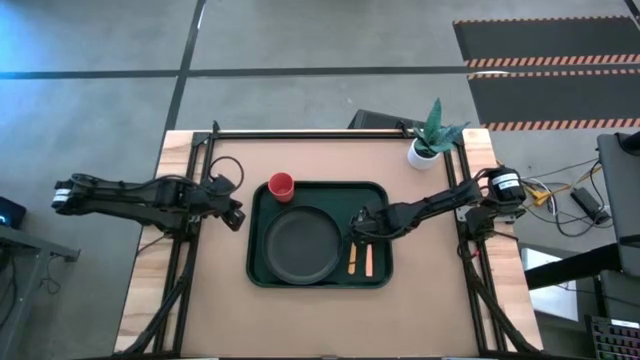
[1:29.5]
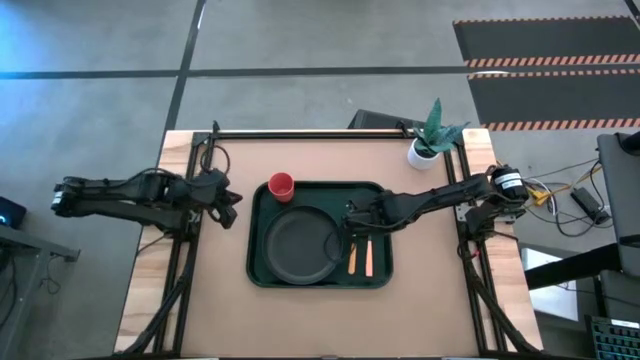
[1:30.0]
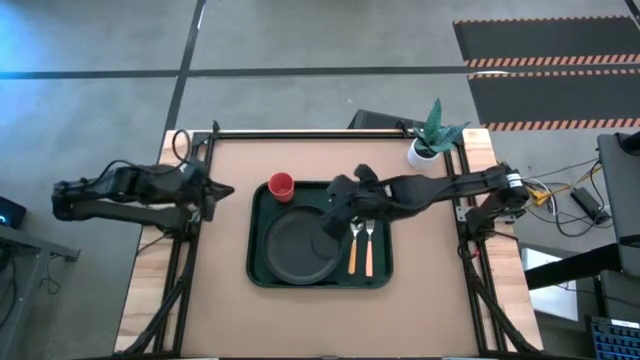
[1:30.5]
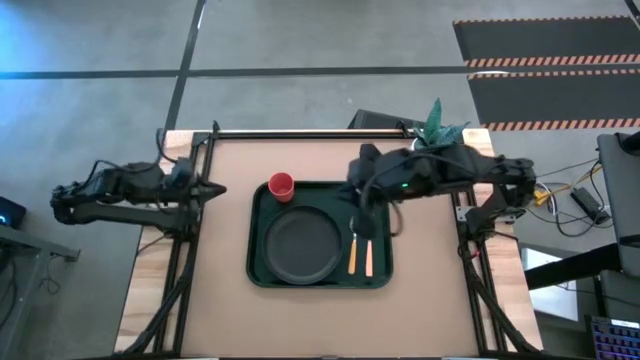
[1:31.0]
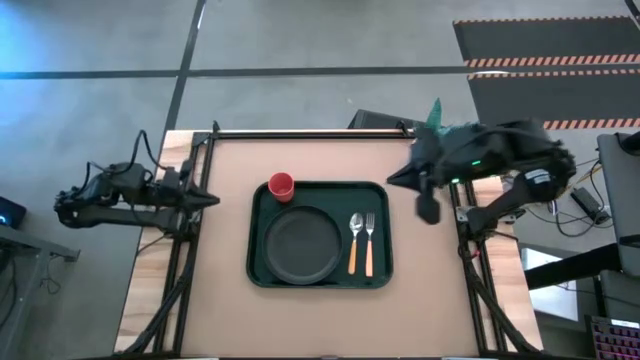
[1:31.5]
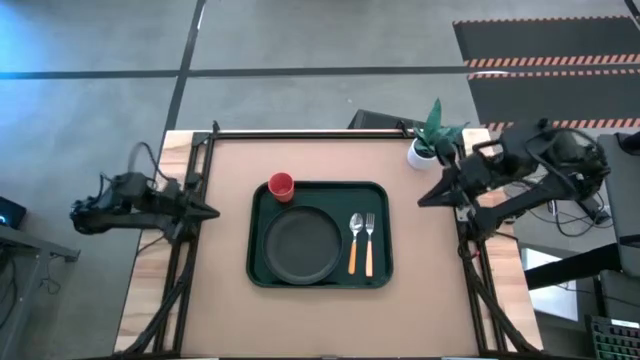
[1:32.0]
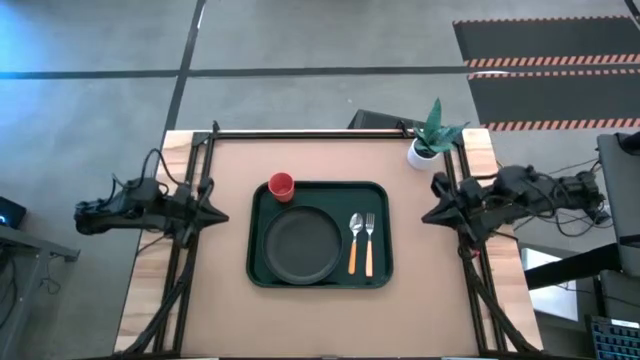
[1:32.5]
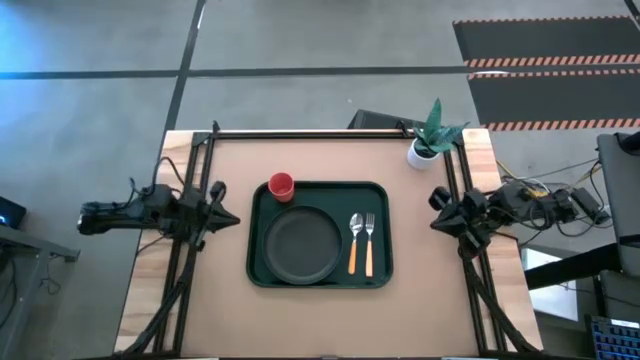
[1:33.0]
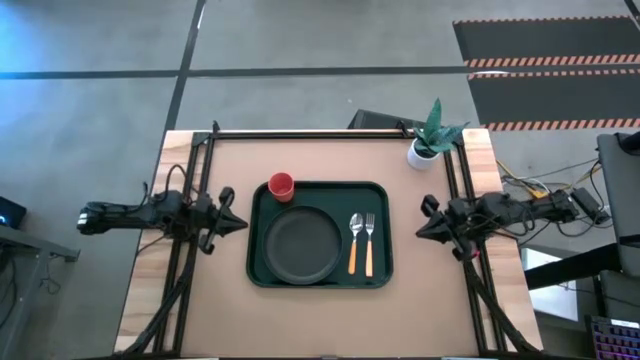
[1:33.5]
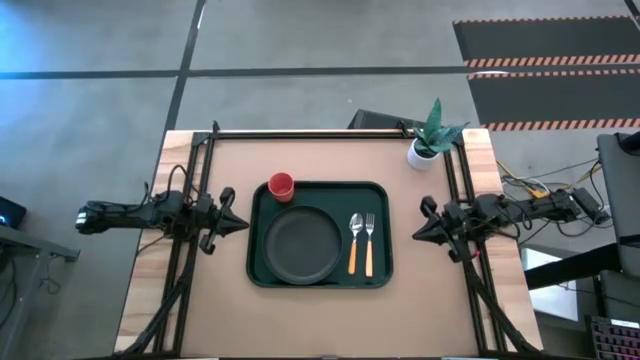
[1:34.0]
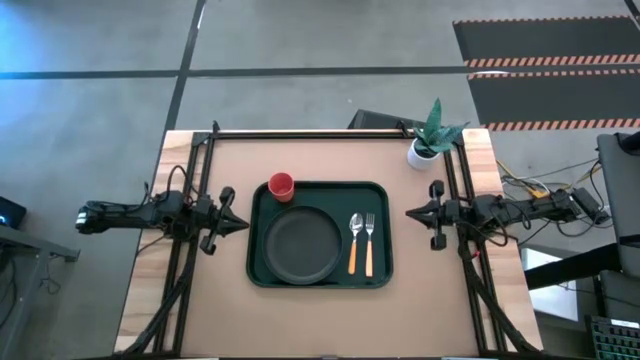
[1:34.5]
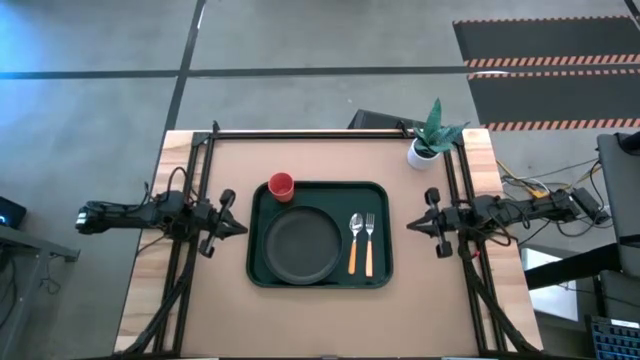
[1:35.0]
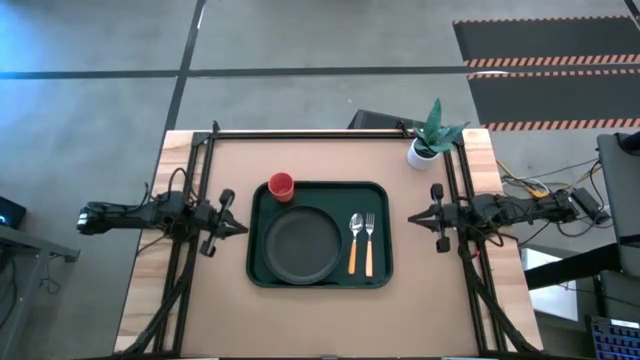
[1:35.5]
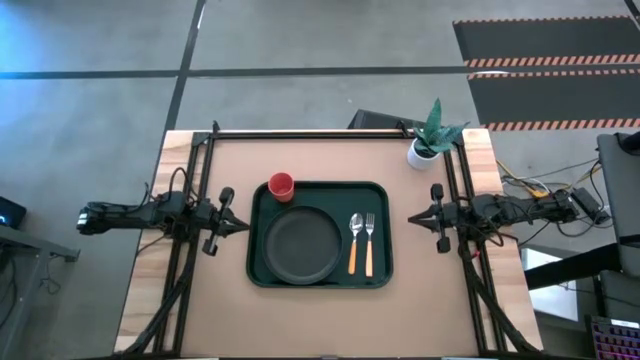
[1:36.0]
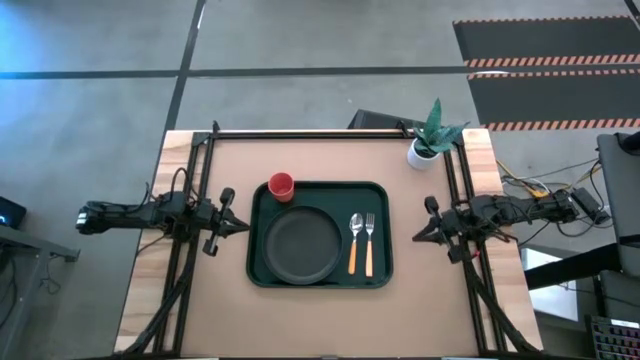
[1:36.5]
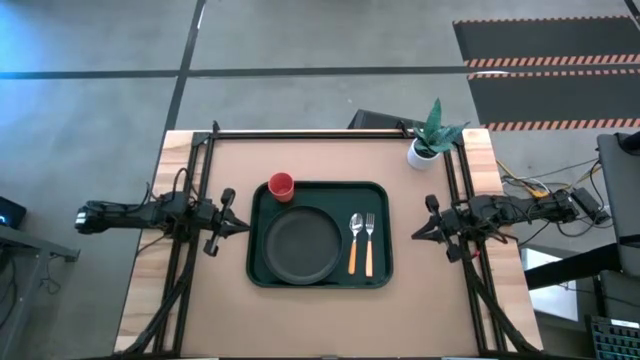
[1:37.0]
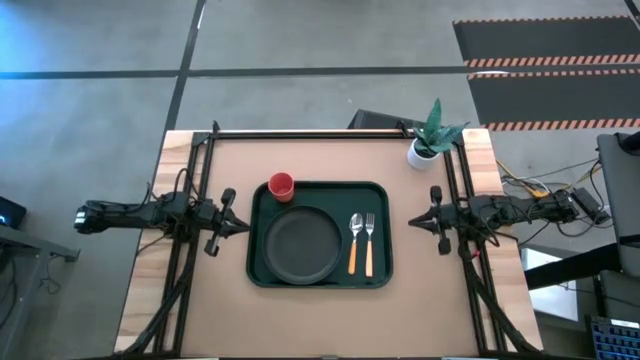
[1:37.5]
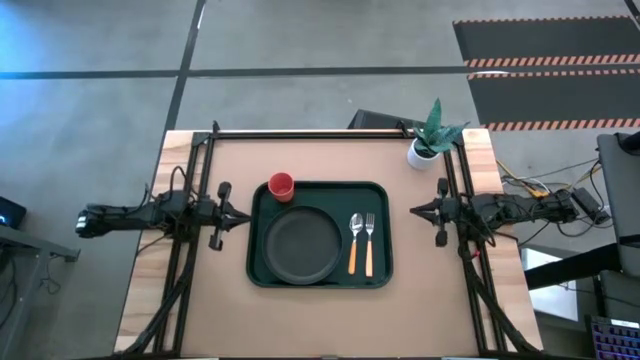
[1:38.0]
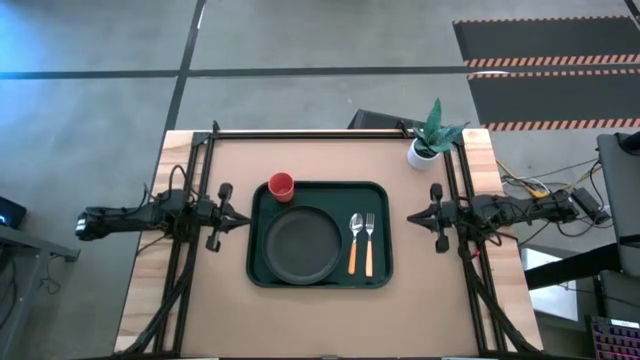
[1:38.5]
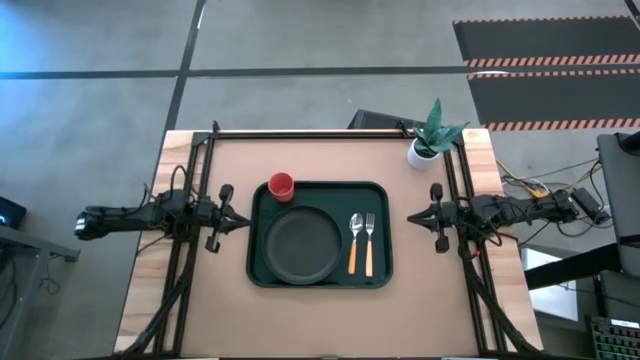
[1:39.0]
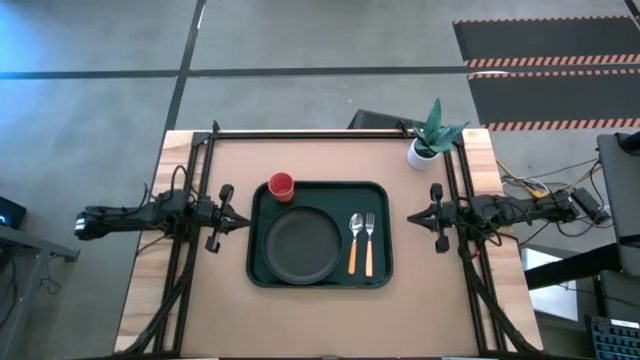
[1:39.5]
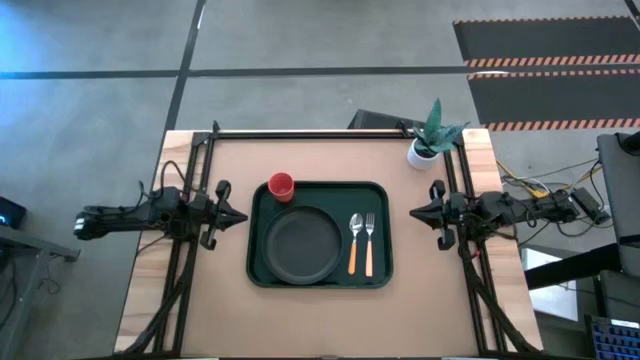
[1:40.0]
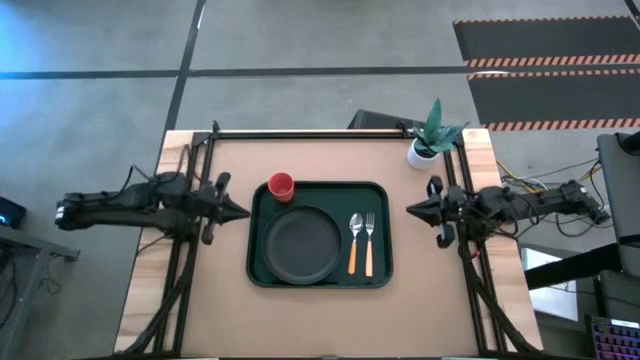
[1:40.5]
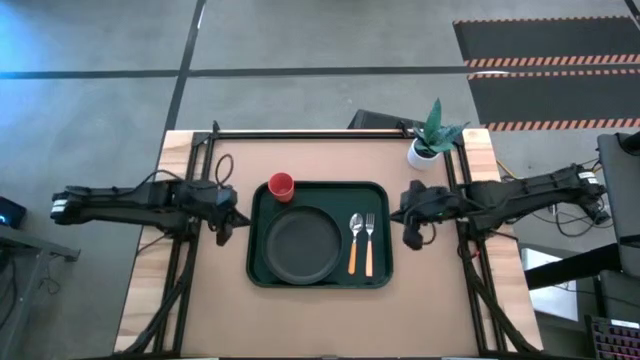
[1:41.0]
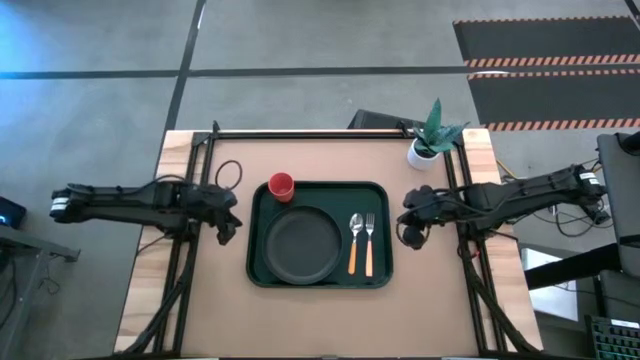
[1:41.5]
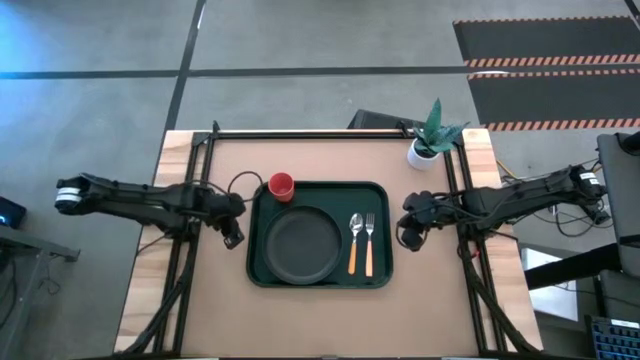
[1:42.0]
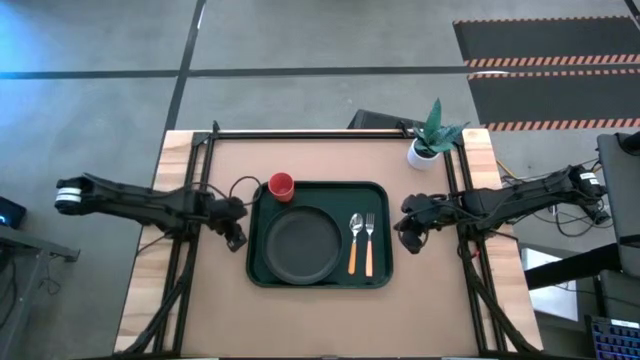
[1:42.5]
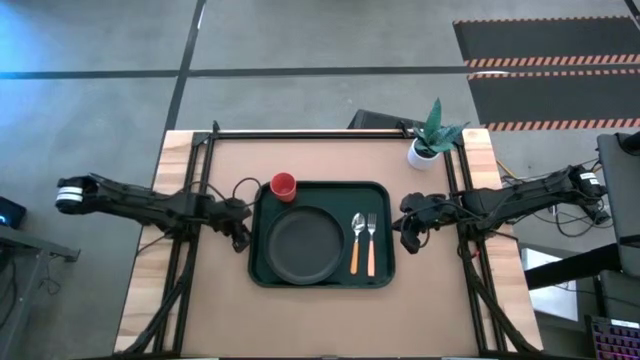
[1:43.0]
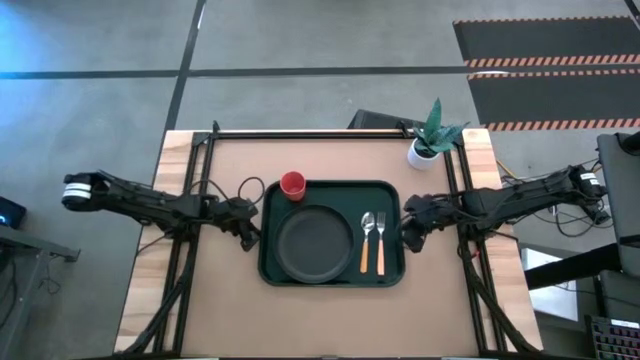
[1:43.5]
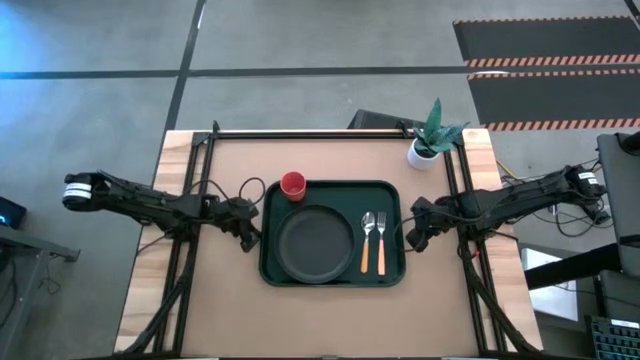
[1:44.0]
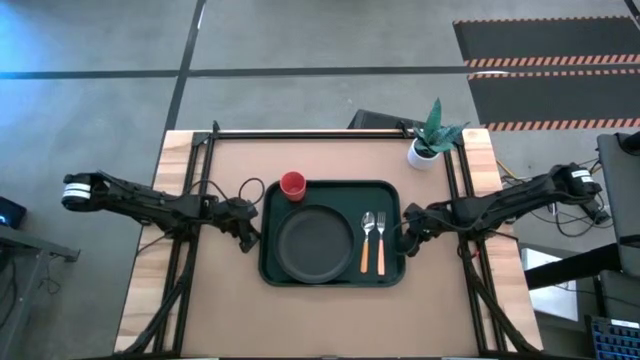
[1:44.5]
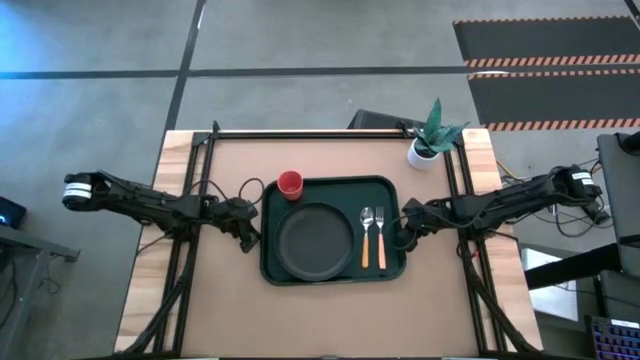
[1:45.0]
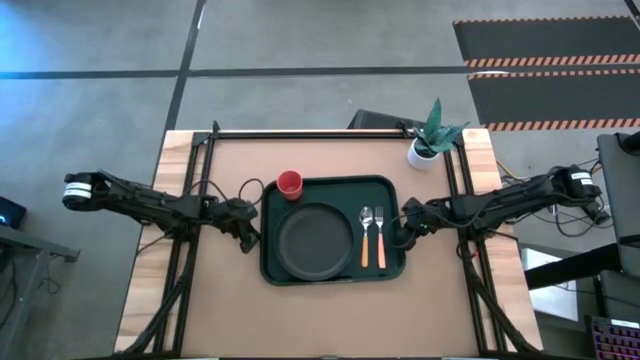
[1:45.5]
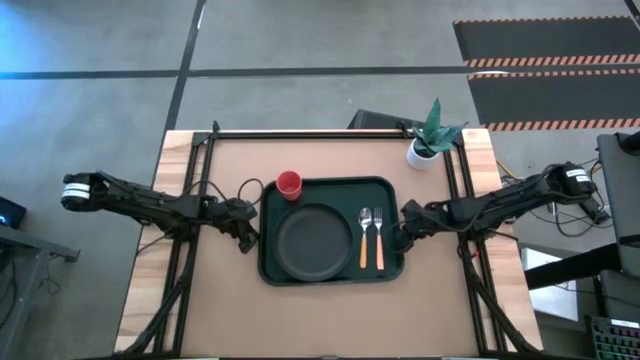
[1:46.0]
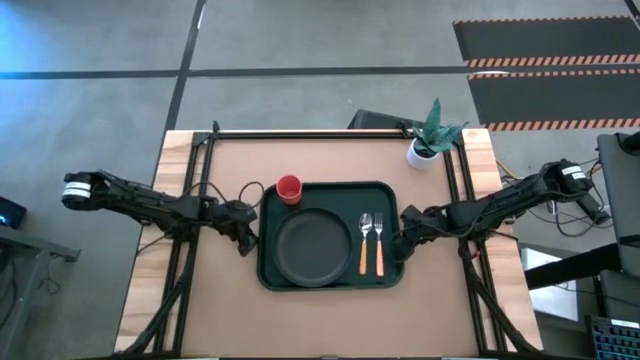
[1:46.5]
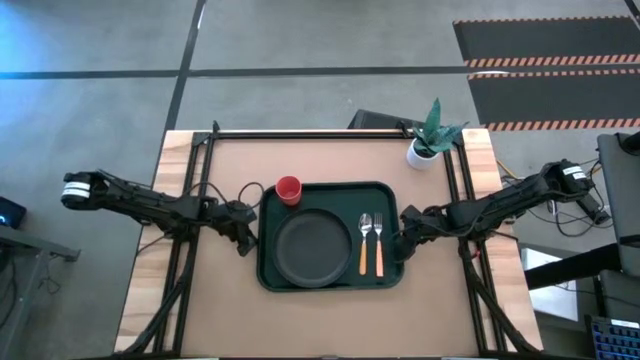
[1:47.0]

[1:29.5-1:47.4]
Task: Pick and place plate/cup/fork/spoon on tray
Adjust the black tray
